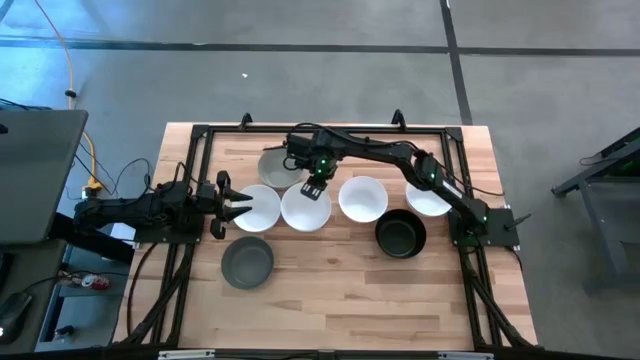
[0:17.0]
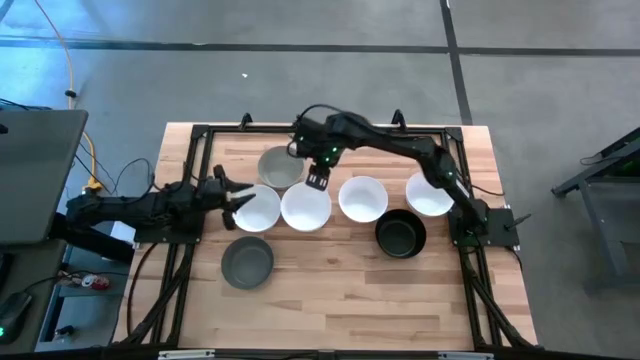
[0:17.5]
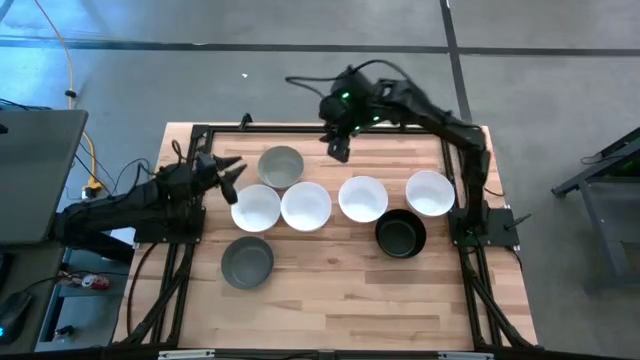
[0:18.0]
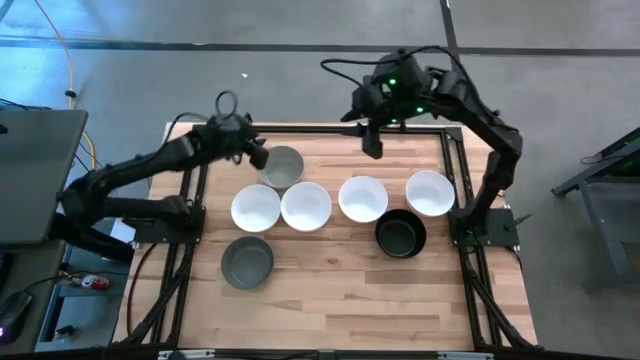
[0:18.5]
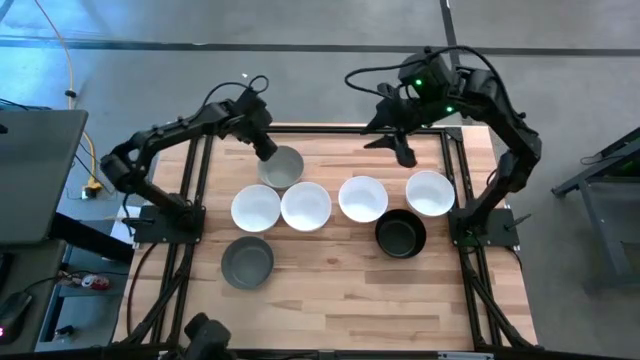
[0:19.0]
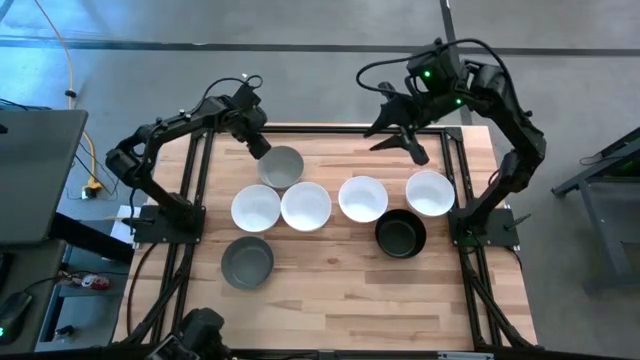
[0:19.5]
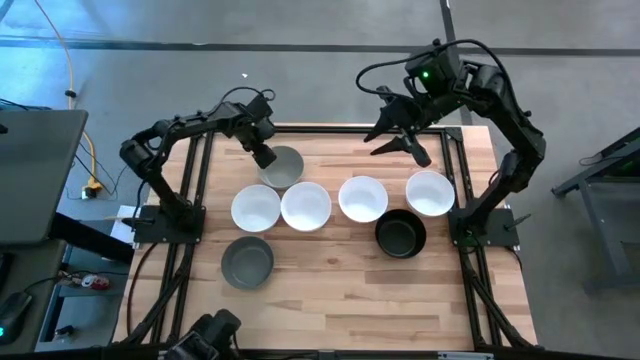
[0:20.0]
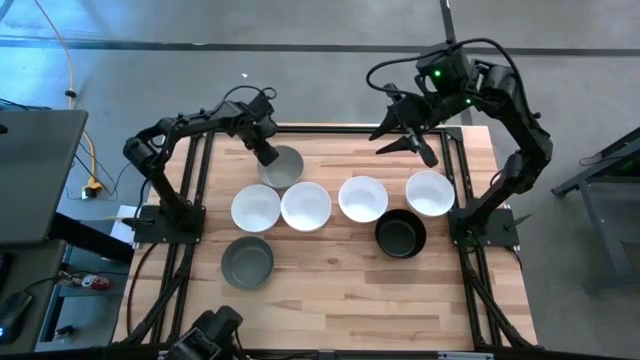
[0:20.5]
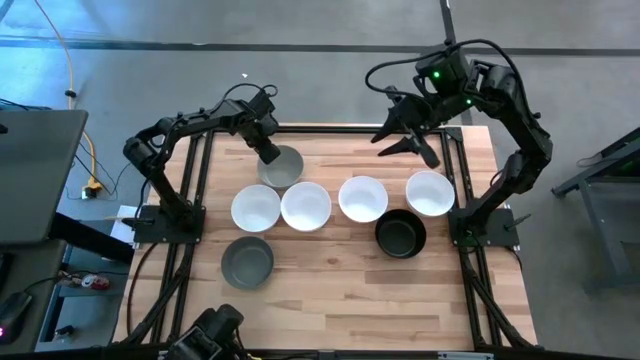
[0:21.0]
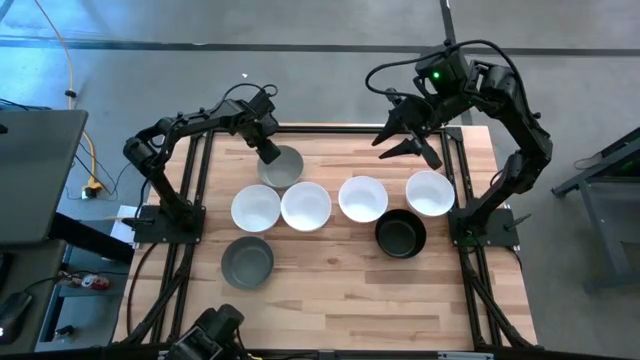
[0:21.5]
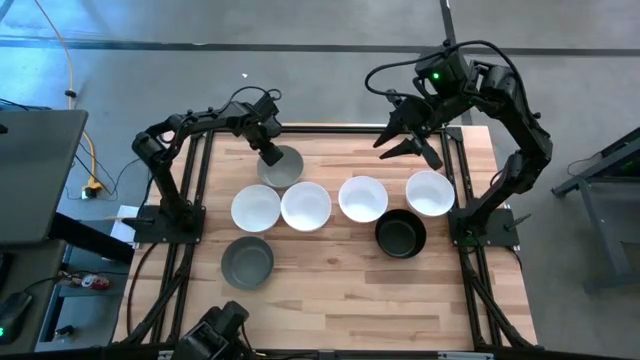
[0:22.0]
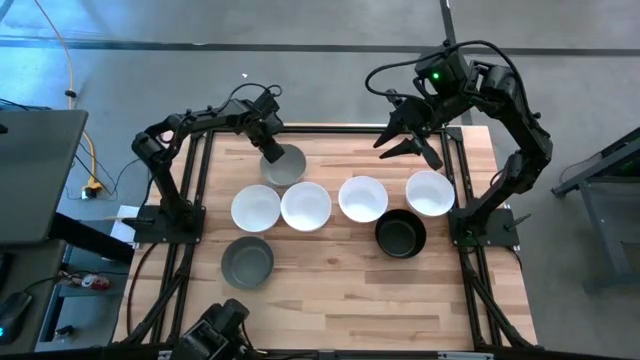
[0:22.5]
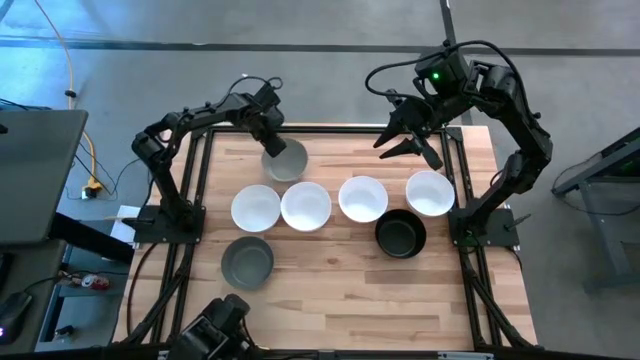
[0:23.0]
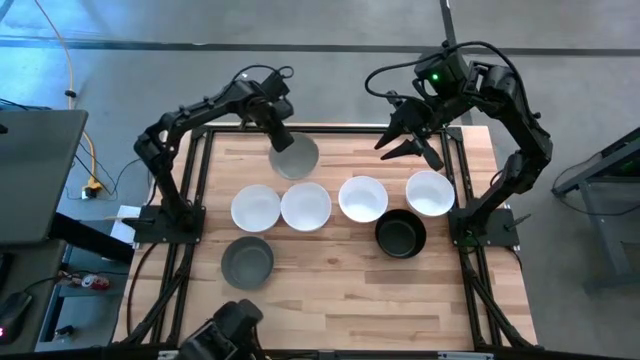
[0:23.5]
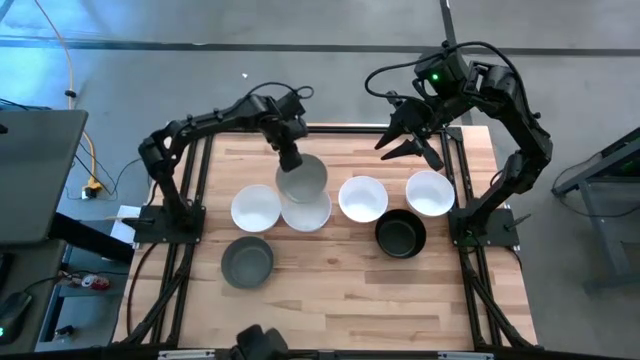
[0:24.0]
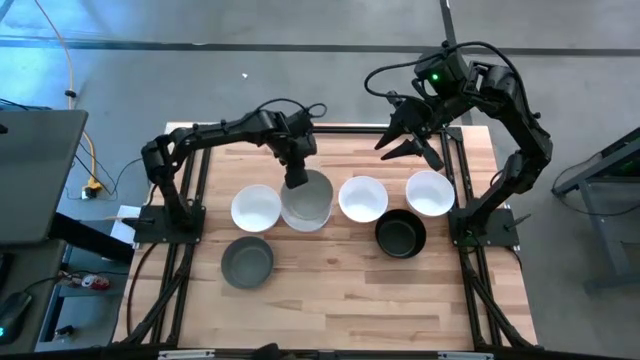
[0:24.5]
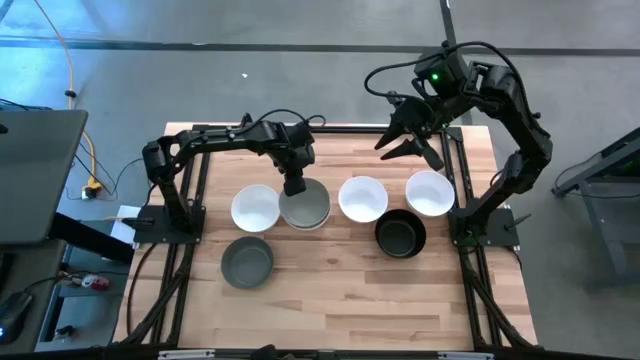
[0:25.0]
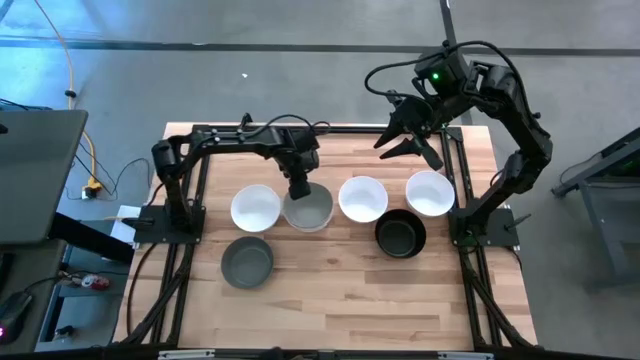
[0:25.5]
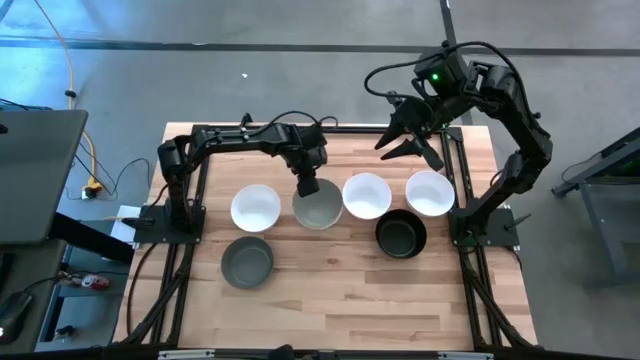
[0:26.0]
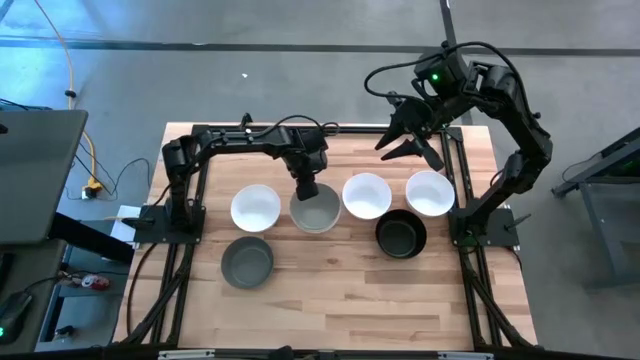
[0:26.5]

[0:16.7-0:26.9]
Task: Nest bowls inside each other
Stack the gray bowl on top of the white bowl

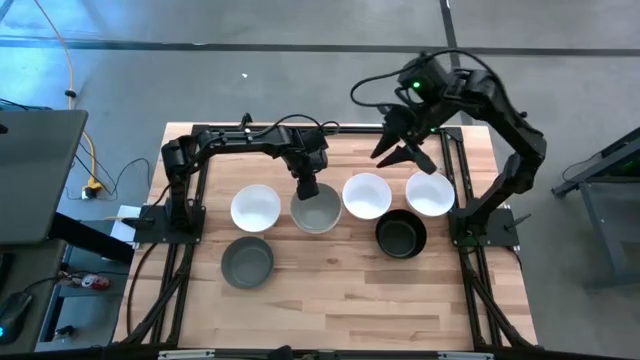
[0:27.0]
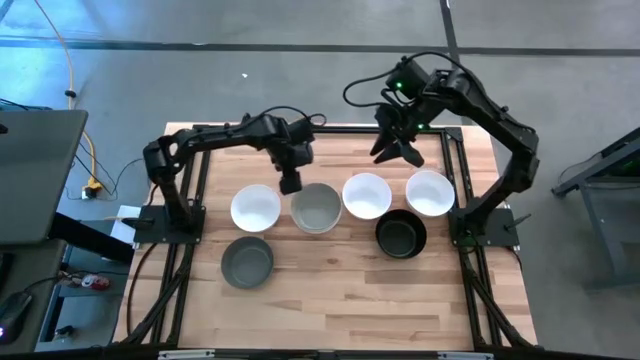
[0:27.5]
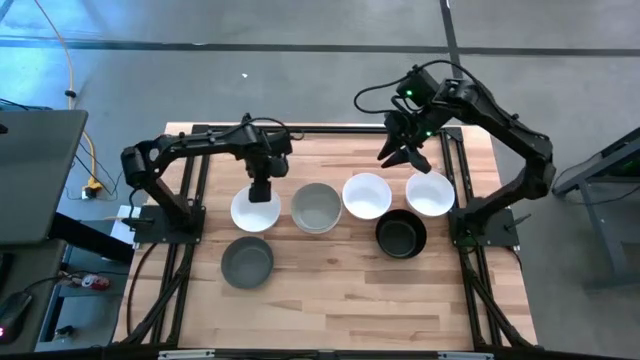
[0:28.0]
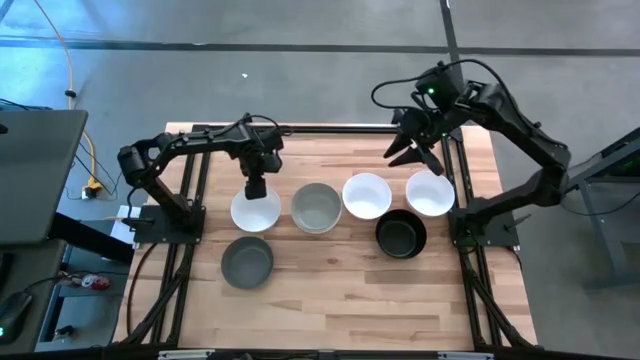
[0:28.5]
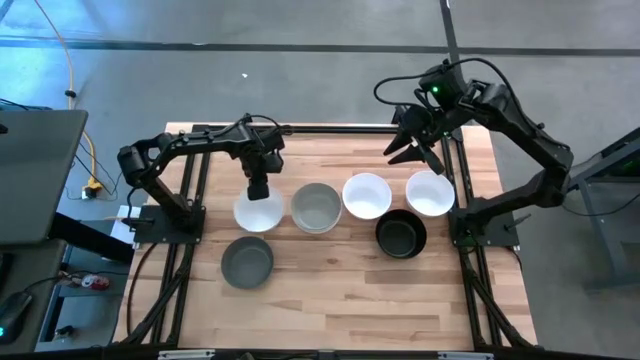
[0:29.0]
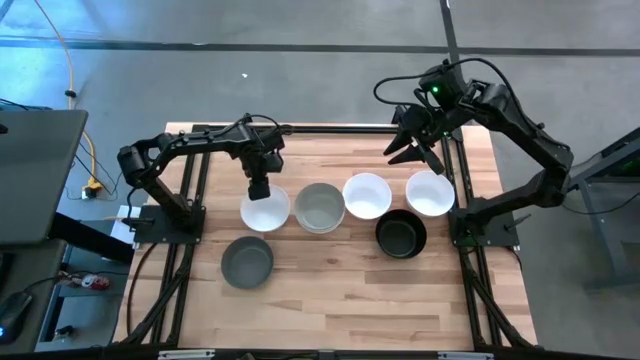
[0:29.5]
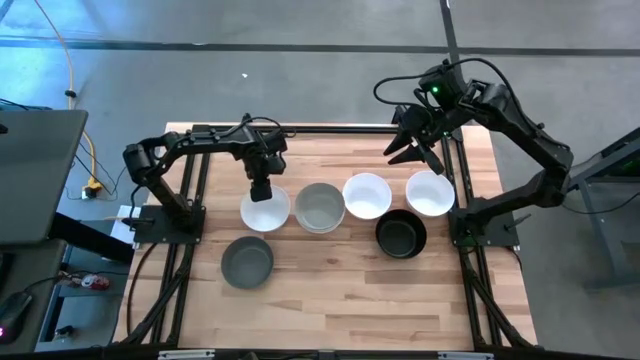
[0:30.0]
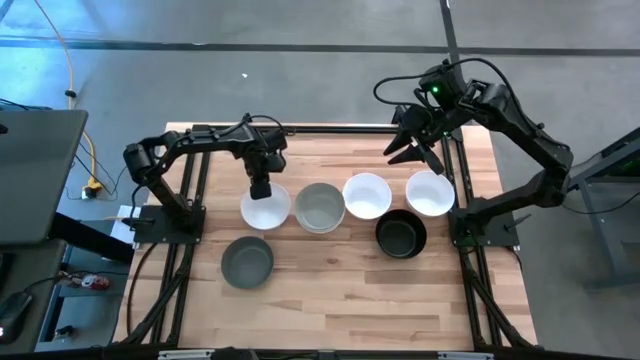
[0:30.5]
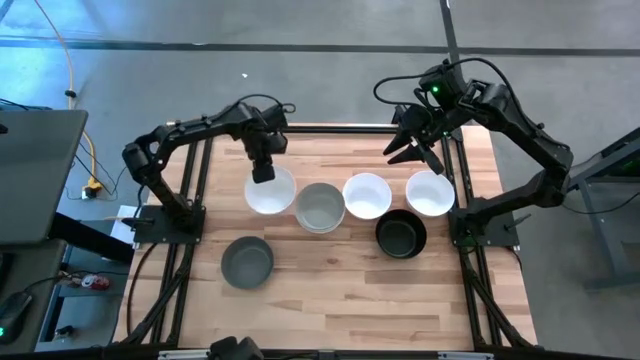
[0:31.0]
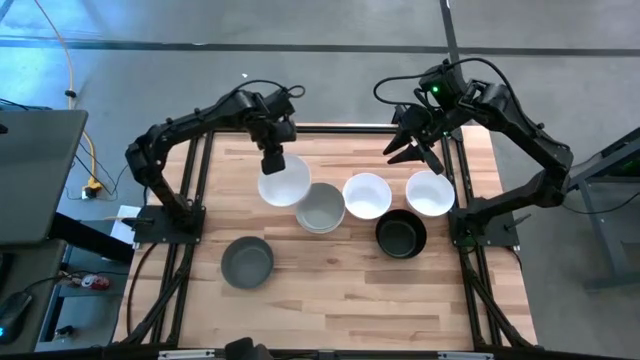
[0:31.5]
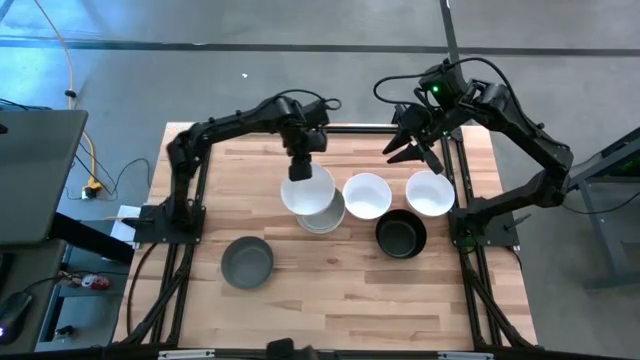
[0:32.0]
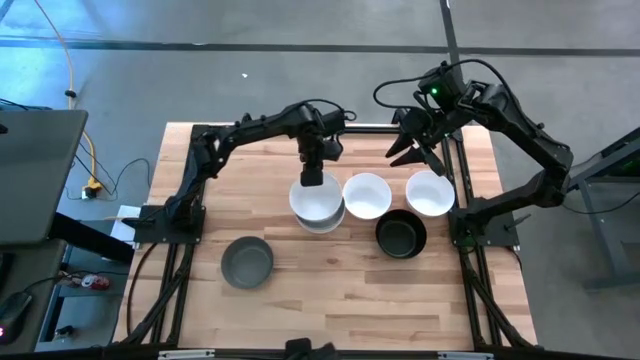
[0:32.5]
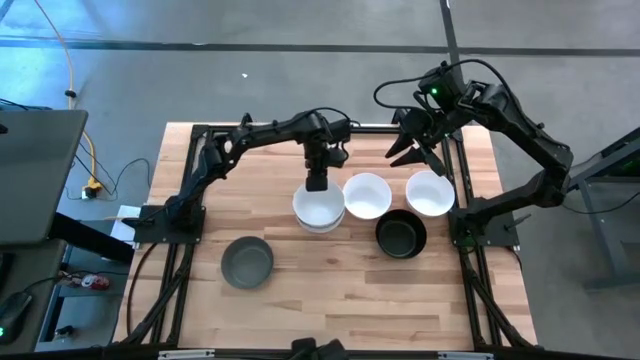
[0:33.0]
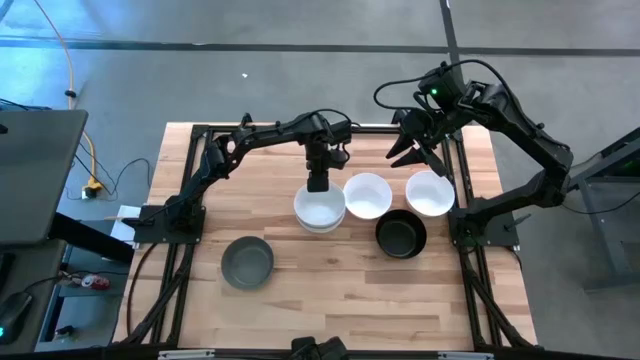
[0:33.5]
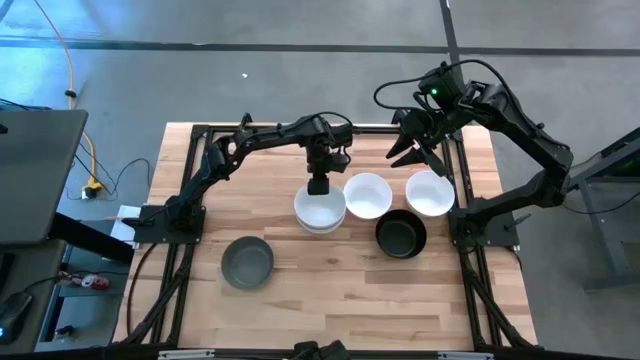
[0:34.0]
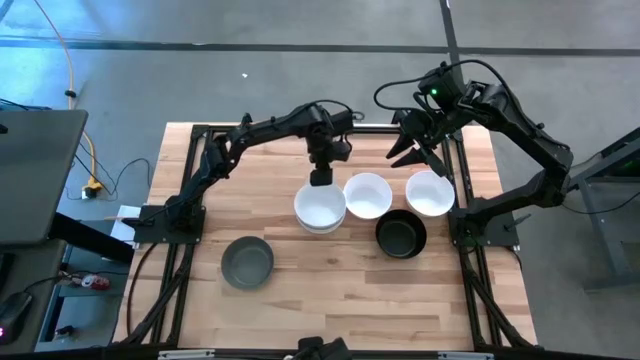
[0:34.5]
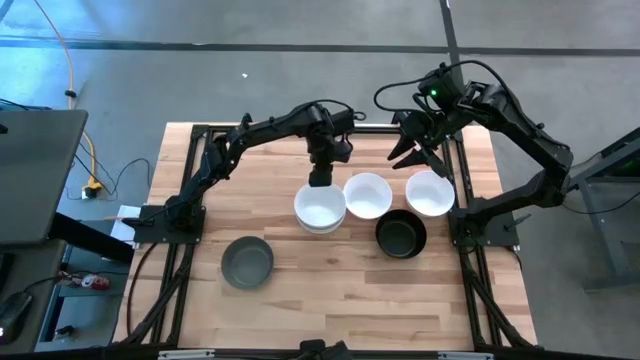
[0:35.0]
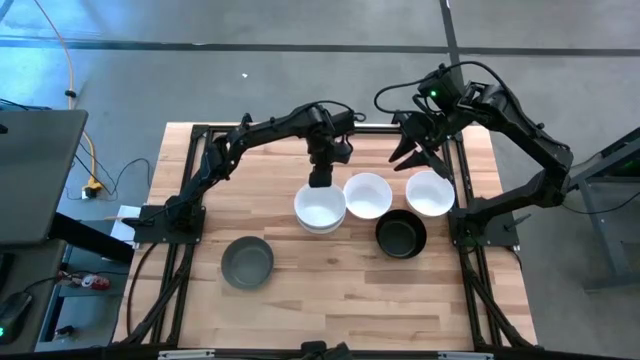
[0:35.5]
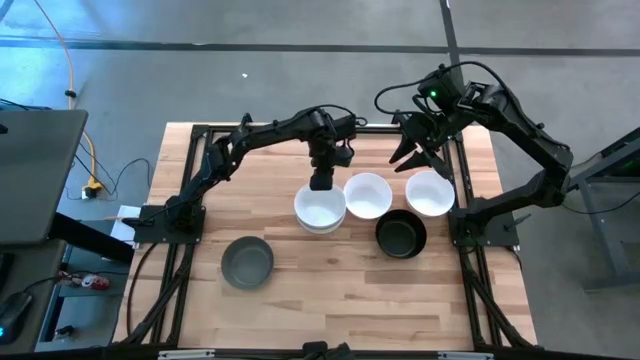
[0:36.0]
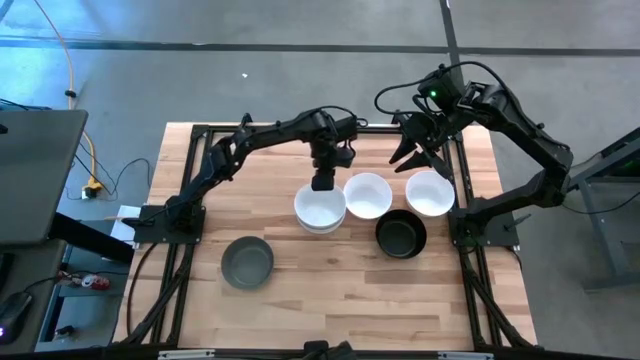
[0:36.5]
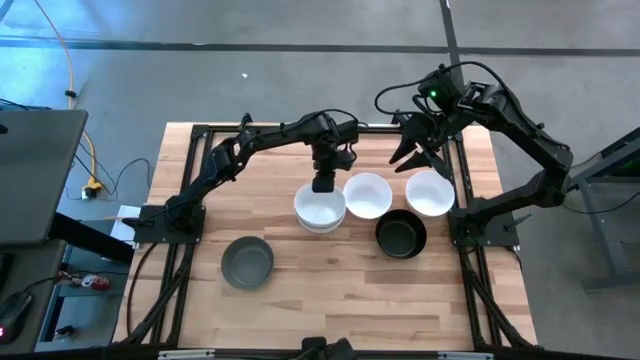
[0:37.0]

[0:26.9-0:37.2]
Stack the white bowl on top of the gray bowl

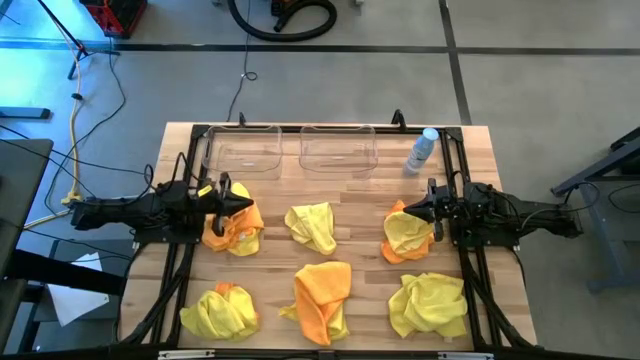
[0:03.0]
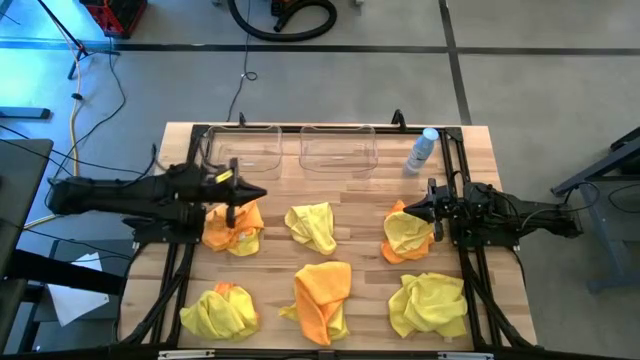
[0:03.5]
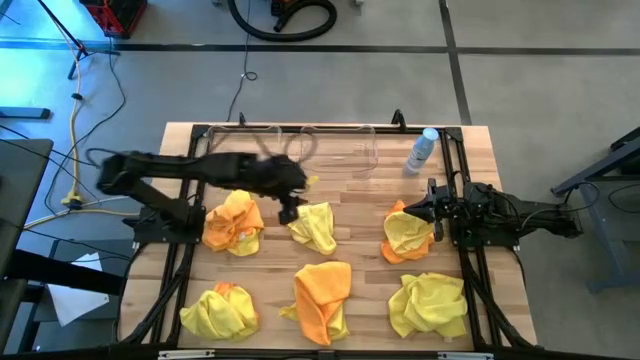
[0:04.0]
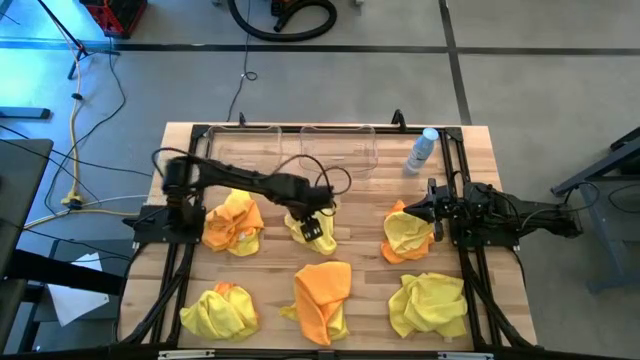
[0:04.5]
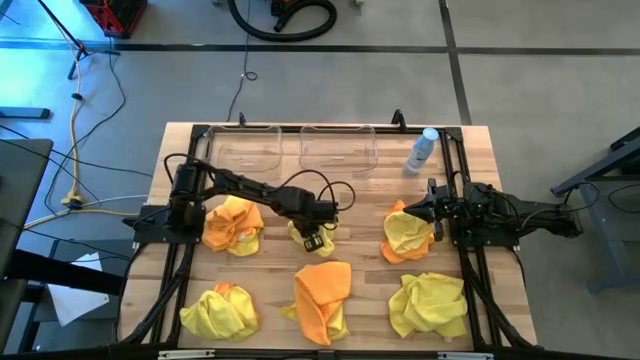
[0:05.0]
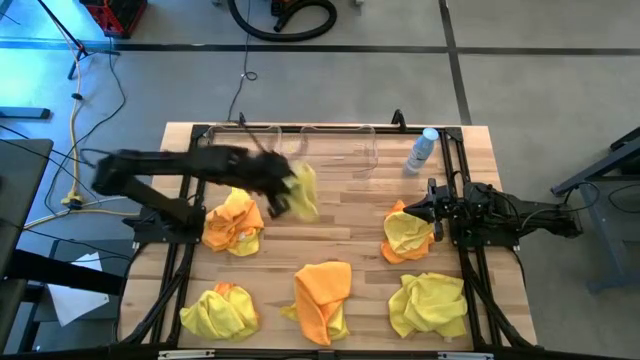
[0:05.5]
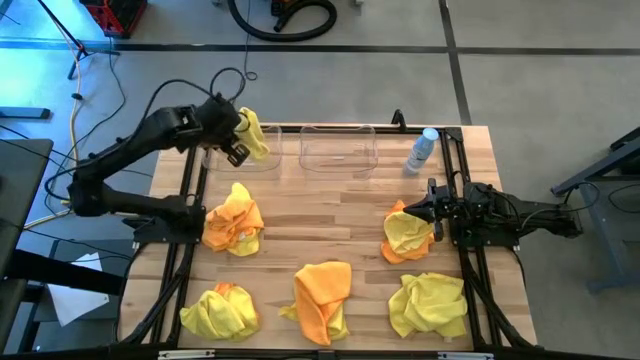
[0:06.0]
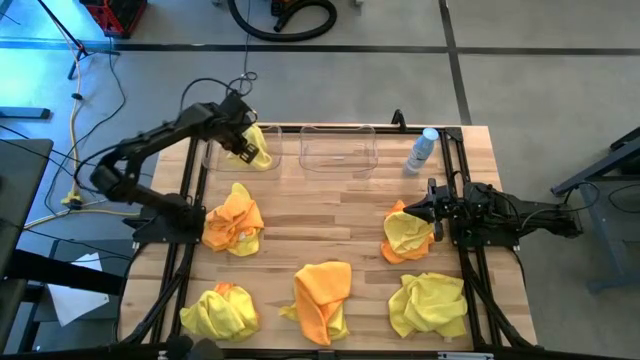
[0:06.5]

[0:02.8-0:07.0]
Task: Sort microfiber towel by color & place in baskets
Put the yellow microfiber towel into the left transparent bin
